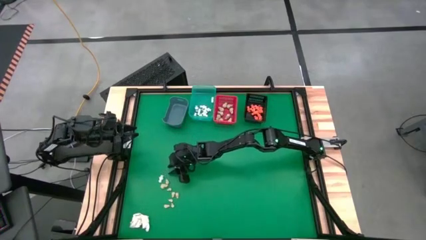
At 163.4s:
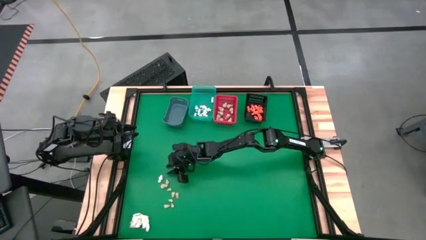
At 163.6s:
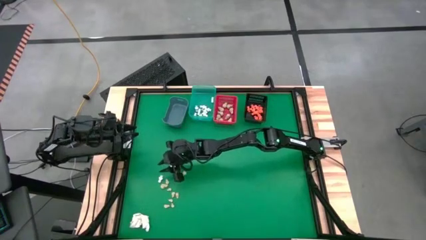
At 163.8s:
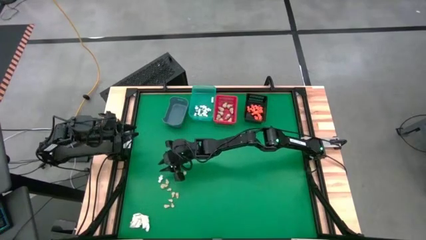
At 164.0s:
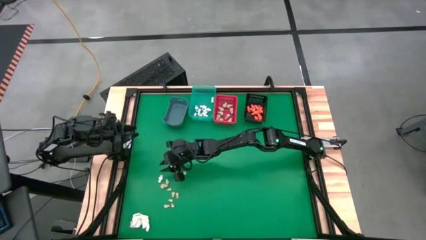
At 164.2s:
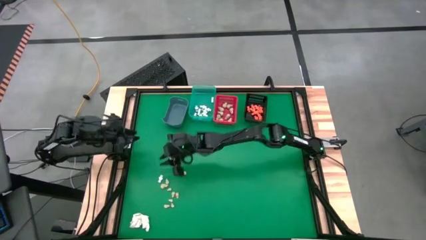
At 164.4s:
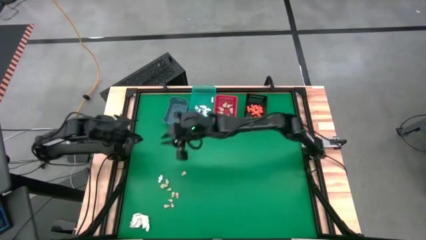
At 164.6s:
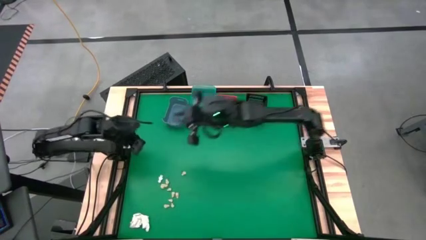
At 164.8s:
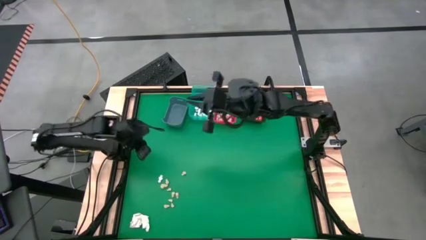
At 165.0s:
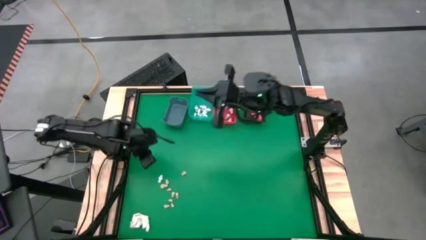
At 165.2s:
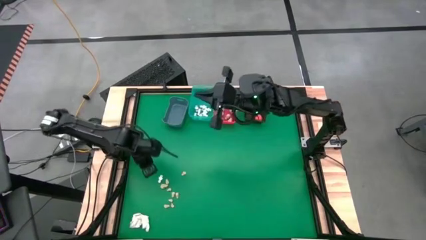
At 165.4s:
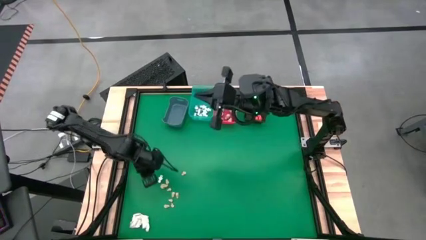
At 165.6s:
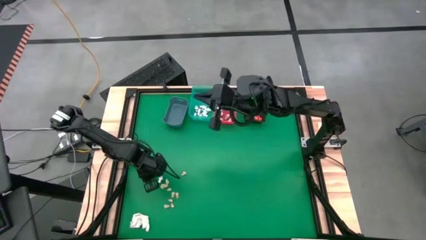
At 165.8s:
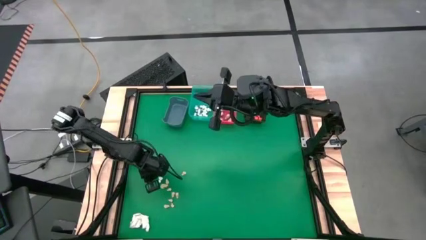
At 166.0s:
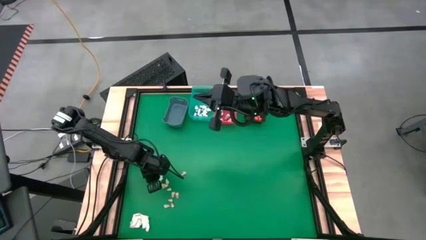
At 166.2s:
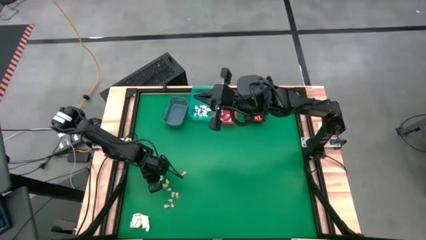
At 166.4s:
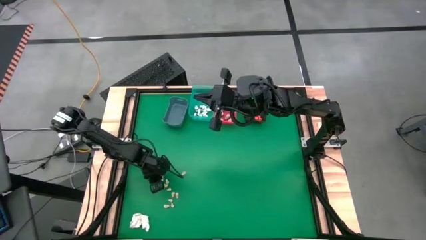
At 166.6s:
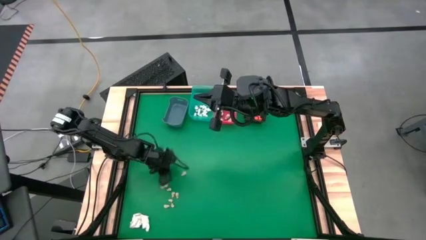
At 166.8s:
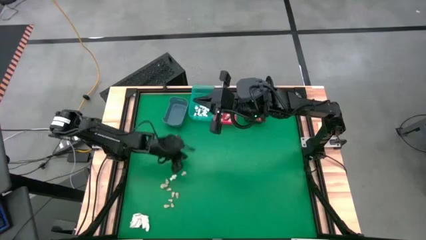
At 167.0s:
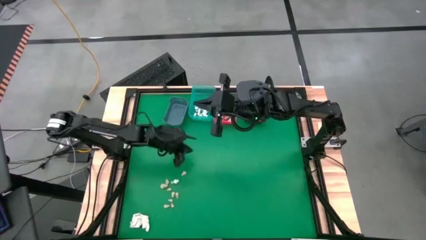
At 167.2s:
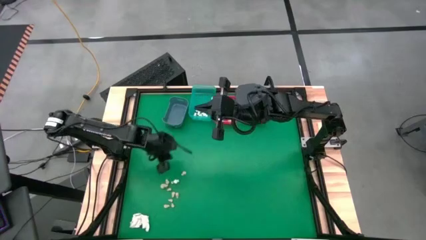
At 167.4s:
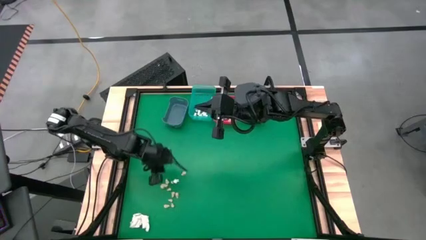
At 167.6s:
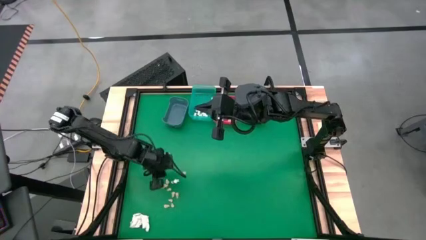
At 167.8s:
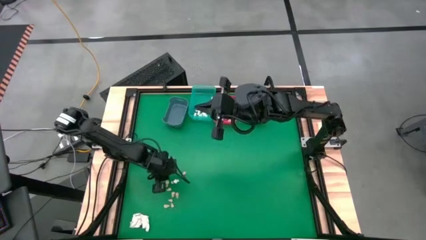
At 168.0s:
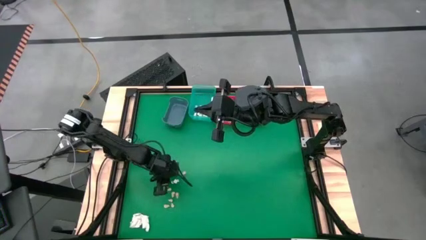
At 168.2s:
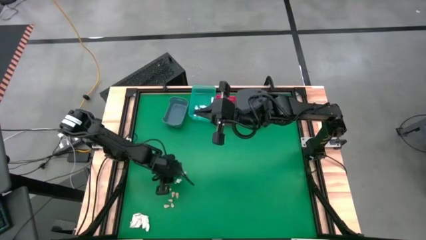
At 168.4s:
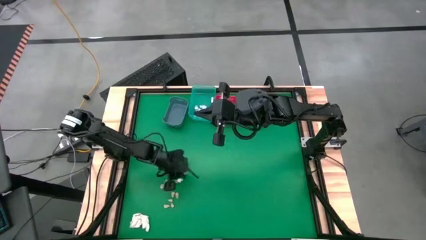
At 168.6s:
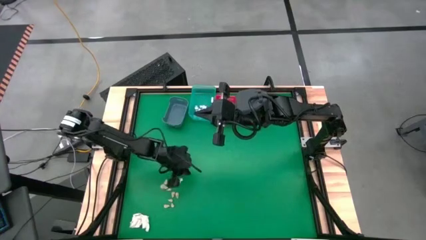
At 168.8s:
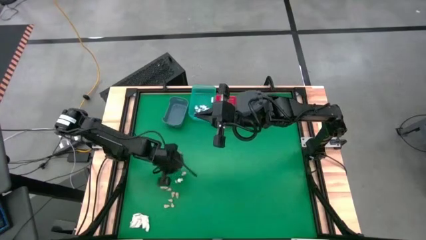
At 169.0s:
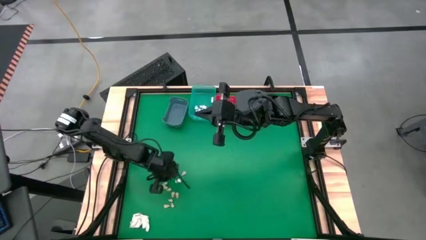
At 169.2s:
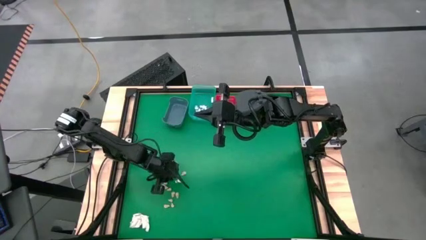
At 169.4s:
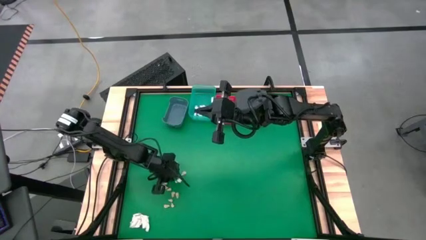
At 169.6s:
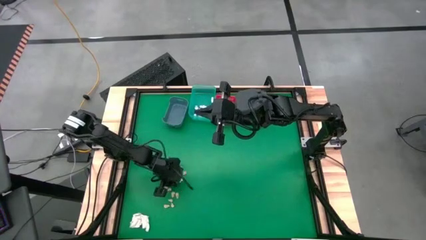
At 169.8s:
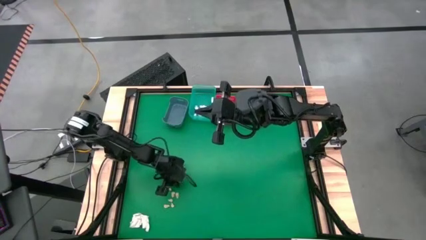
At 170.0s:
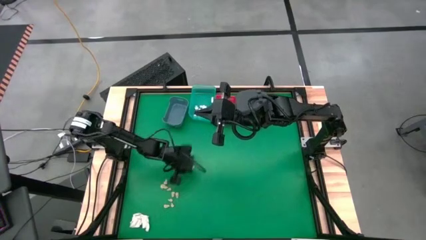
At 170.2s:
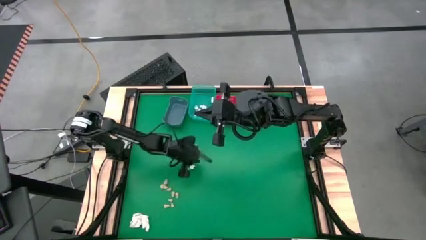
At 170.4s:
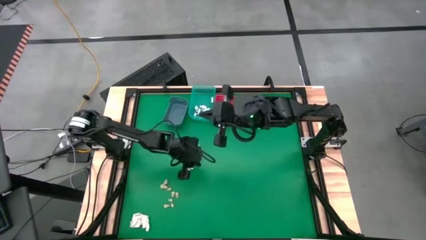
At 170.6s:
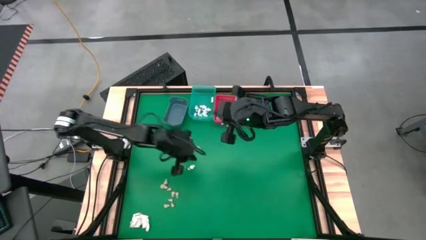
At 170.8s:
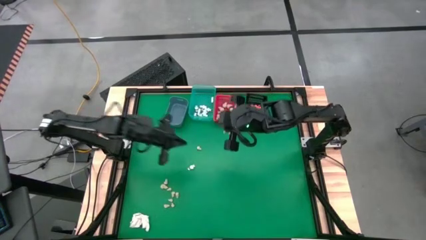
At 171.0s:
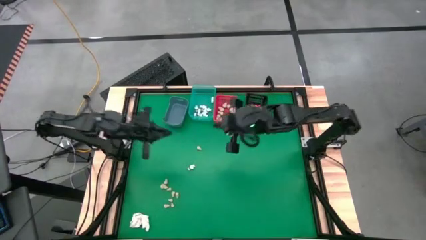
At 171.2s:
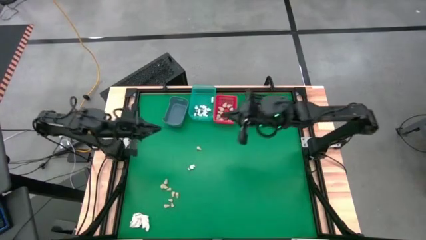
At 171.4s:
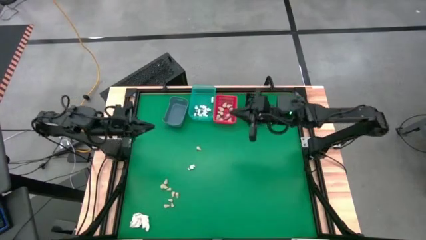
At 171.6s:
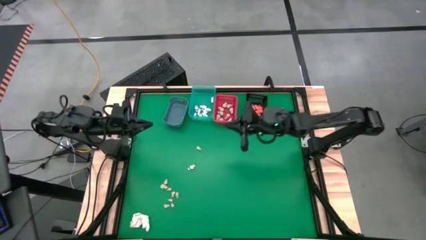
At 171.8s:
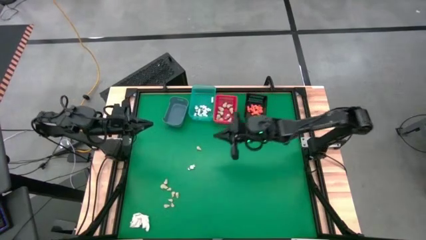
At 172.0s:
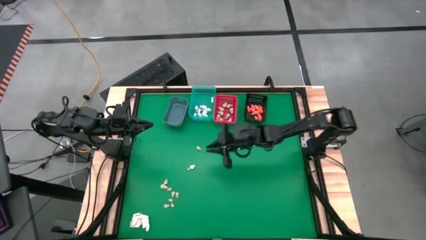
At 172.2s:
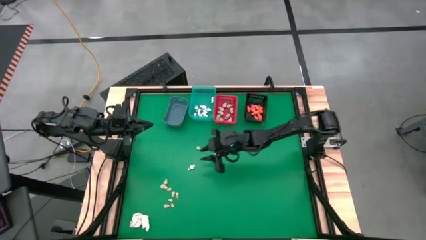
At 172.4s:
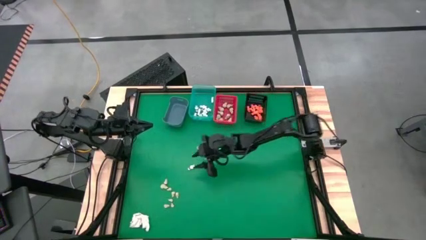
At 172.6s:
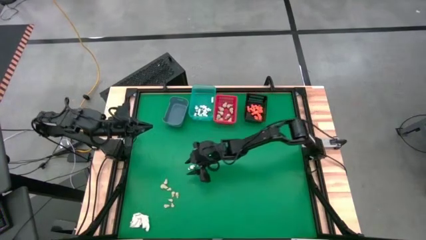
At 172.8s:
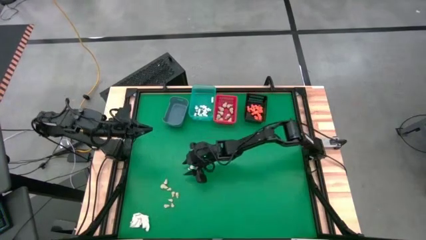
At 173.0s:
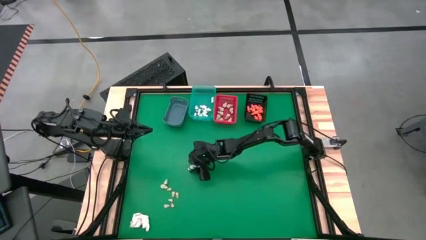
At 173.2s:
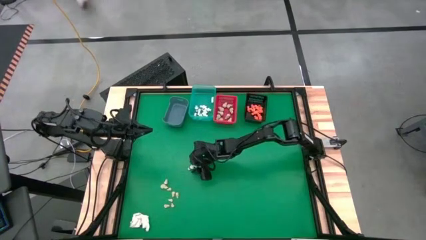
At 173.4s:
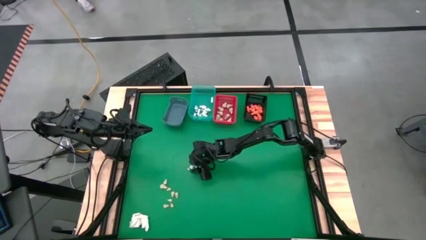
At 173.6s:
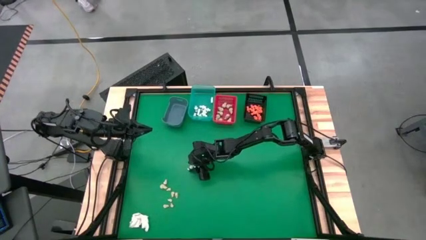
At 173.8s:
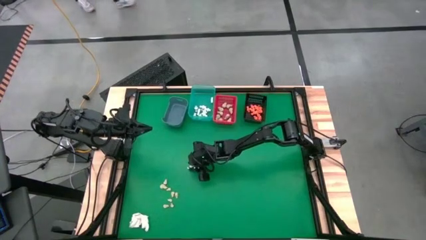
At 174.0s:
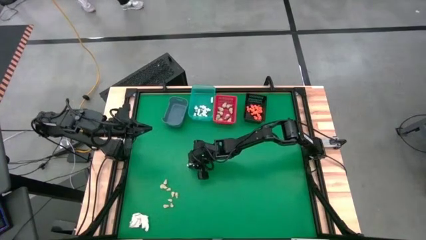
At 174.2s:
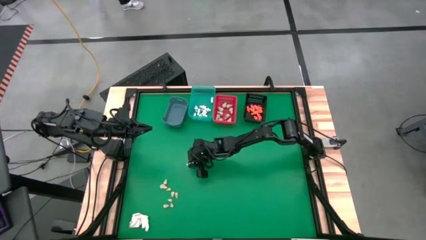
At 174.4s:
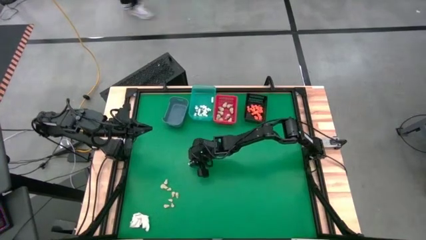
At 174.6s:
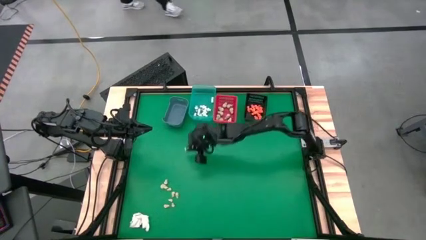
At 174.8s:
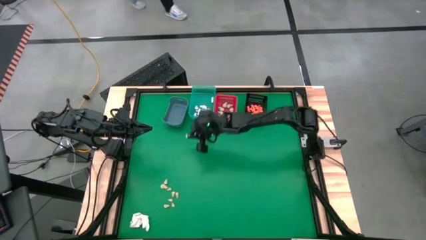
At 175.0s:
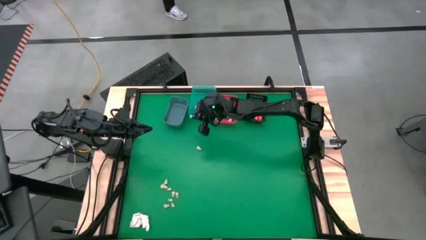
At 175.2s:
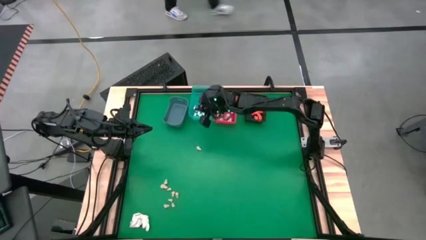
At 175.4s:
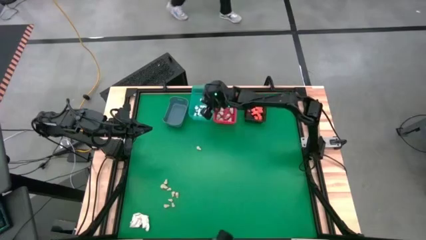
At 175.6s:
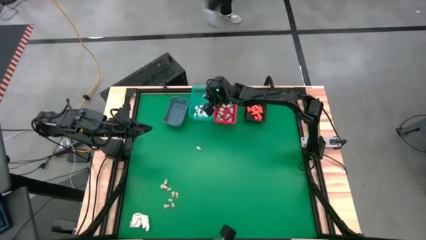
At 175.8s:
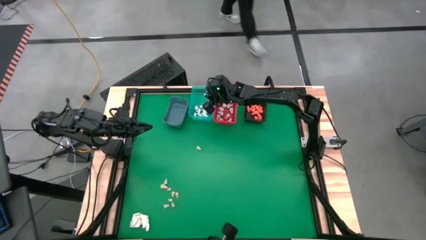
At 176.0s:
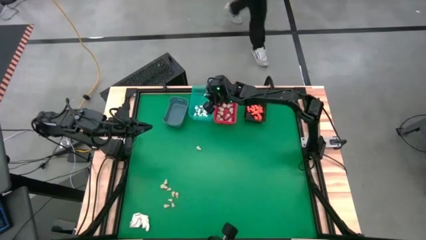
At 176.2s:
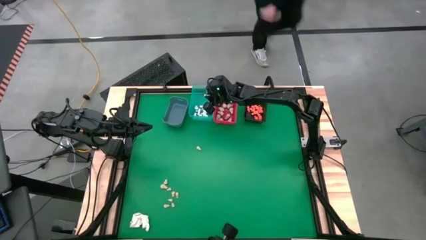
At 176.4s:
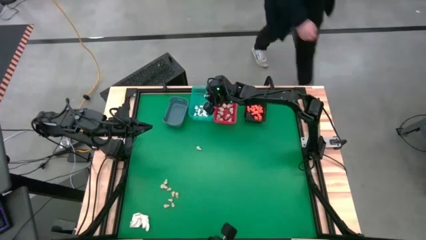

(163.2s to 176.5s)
Task: Sort Halloween decoration
Put the white skeleton toy into the light blue bin

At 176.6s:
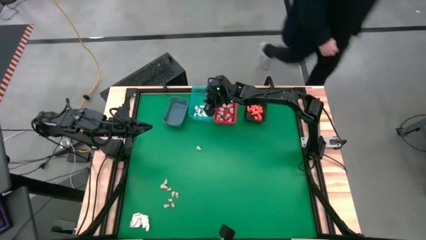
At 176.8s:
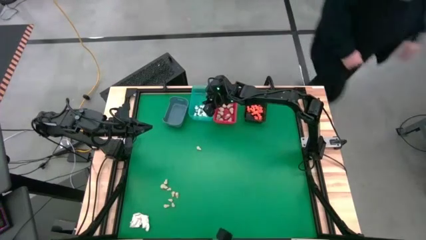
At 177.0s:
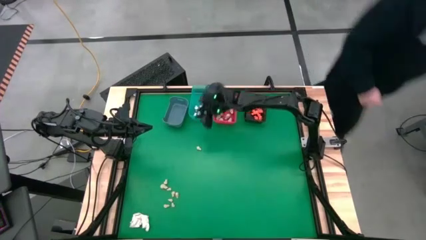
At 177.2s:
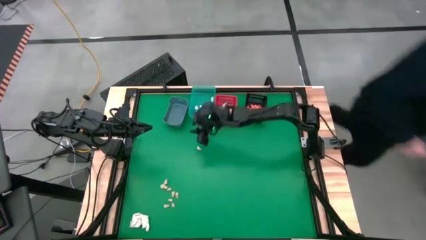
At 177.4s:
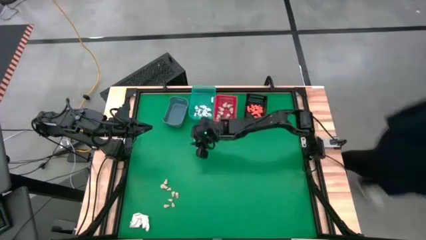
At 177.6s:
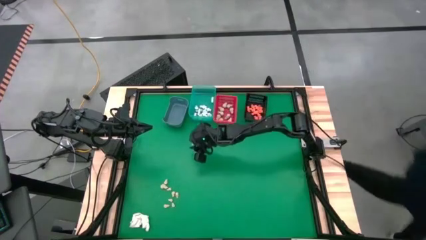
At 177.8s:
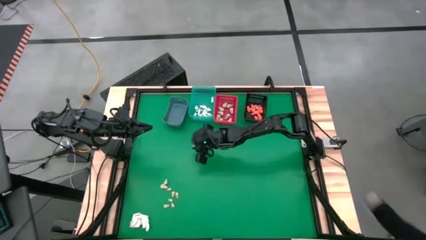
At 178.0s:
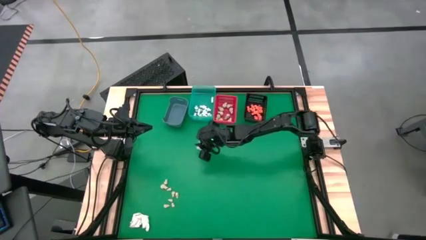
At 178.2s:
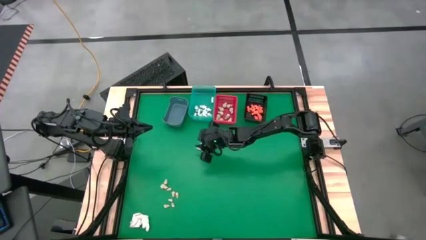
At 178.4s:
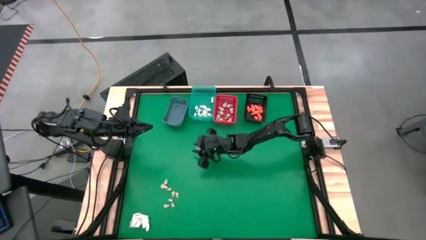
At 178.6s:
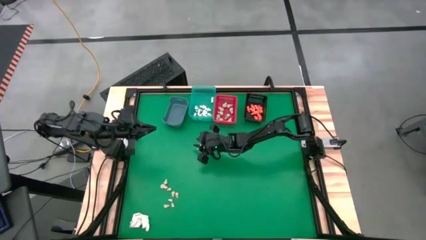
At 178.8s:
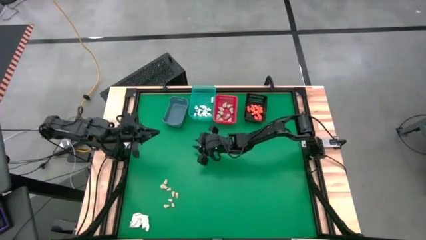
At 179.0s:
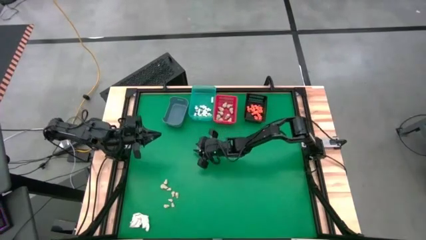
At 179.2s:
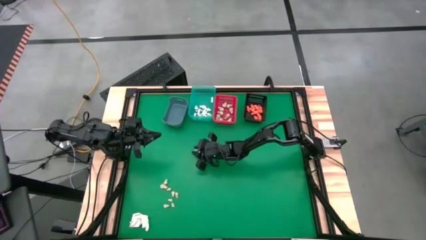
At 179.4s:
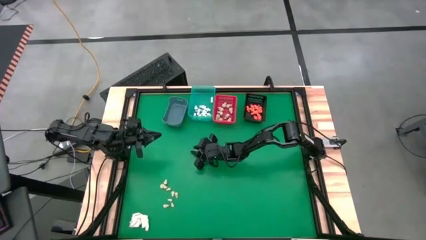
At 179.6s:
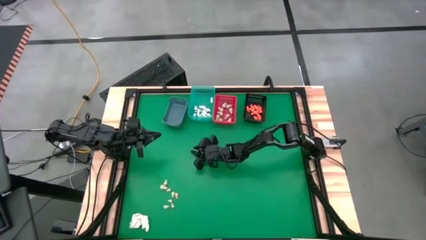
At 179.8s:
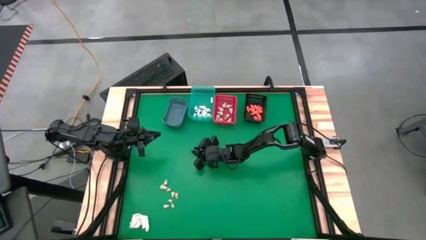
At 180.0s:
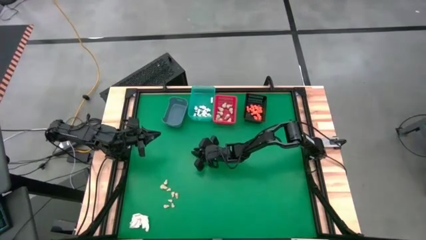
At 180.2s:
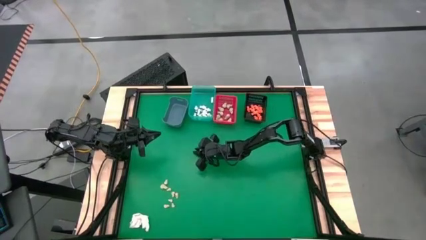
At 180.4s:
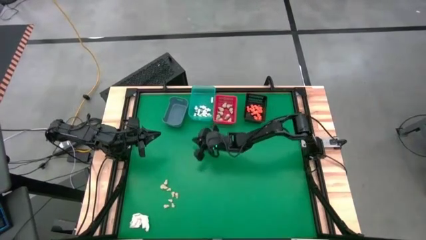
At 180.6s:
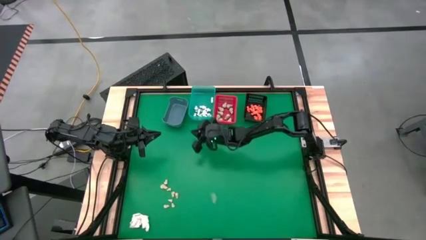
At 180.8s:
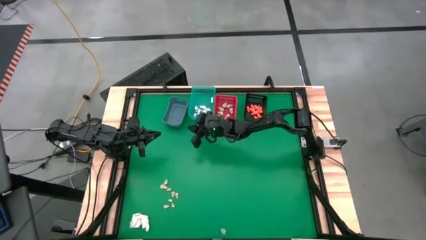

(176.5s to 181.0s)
Put the white skull toy into the blue bin
